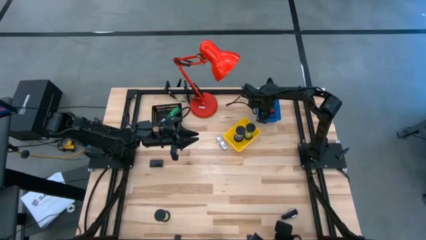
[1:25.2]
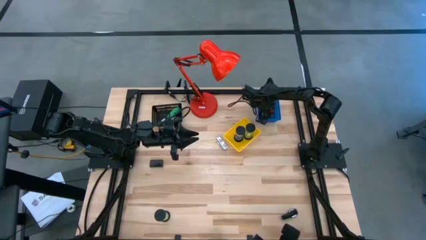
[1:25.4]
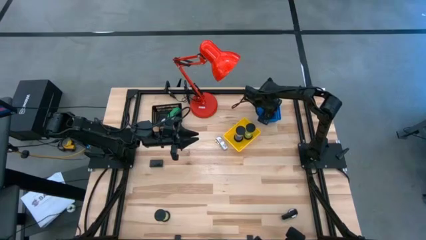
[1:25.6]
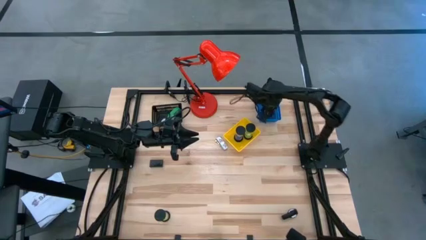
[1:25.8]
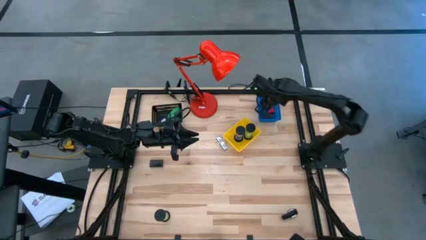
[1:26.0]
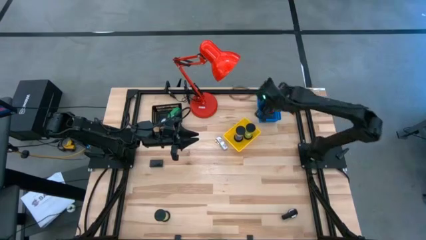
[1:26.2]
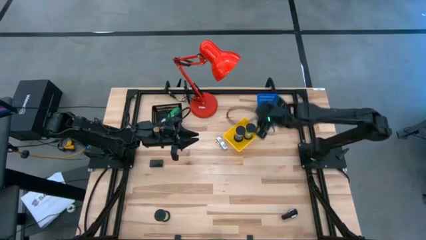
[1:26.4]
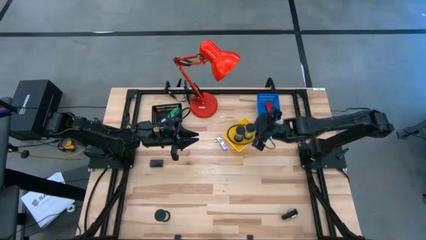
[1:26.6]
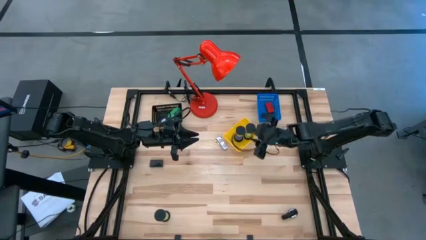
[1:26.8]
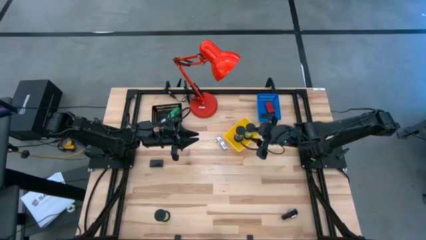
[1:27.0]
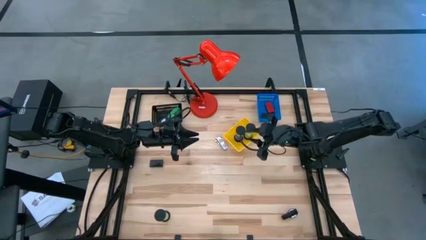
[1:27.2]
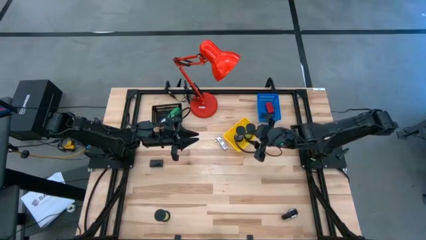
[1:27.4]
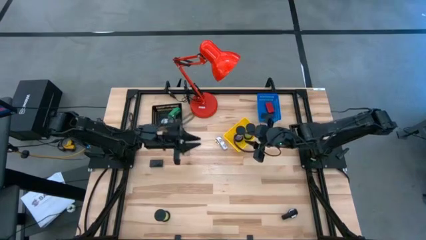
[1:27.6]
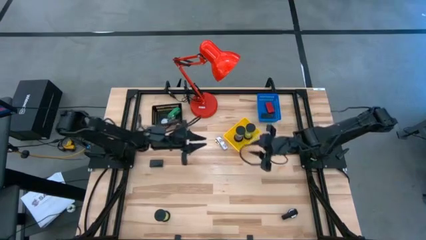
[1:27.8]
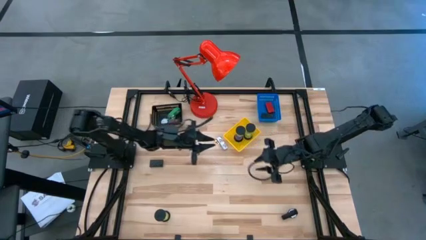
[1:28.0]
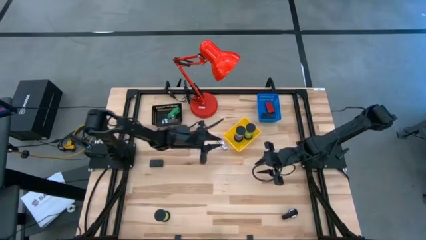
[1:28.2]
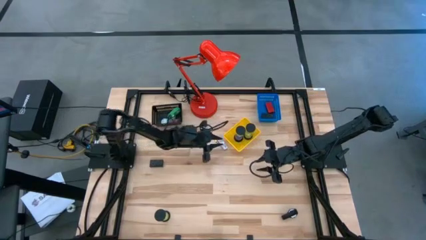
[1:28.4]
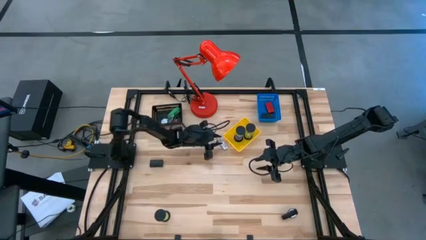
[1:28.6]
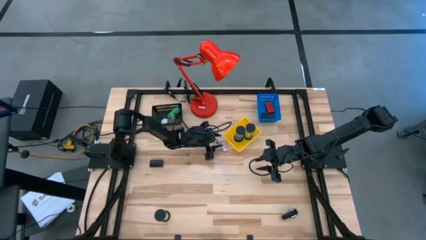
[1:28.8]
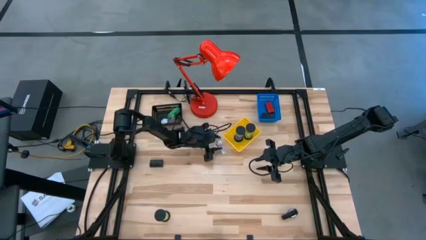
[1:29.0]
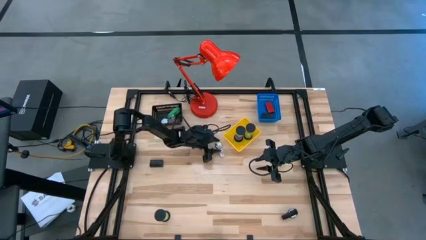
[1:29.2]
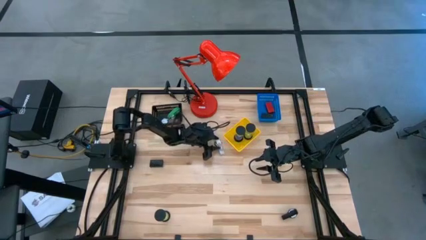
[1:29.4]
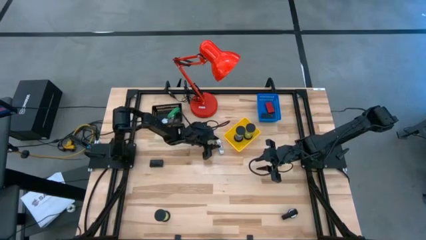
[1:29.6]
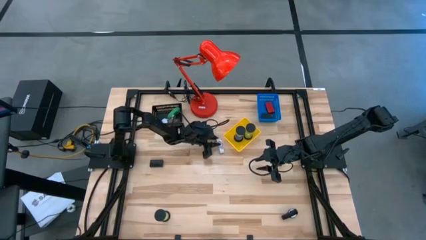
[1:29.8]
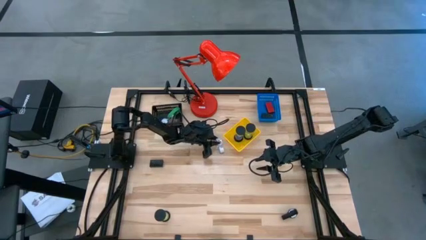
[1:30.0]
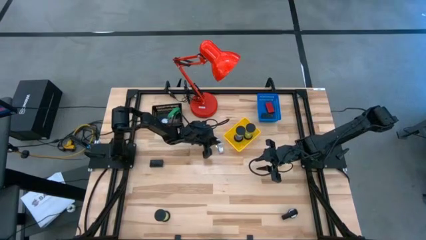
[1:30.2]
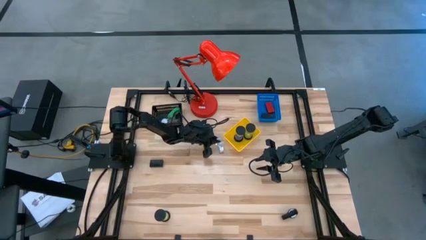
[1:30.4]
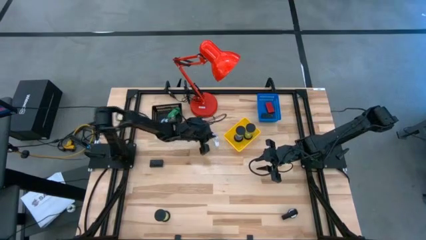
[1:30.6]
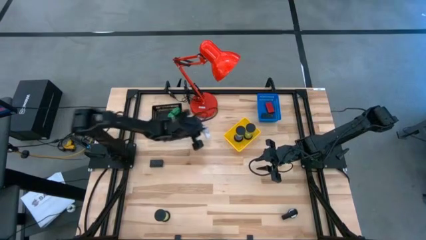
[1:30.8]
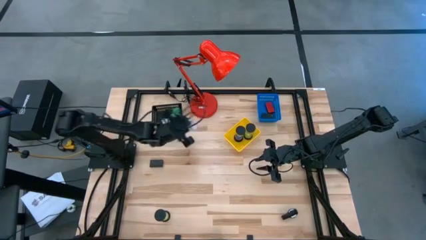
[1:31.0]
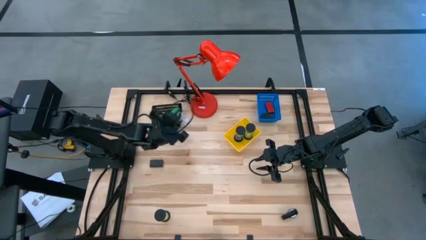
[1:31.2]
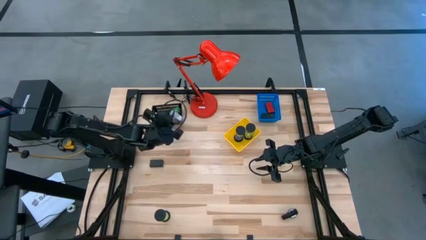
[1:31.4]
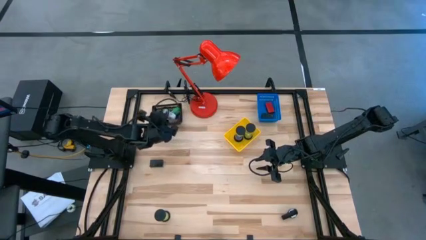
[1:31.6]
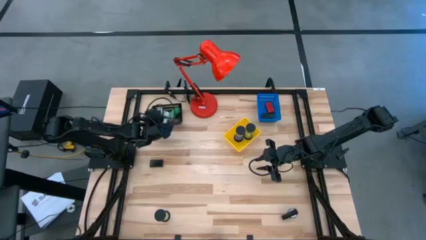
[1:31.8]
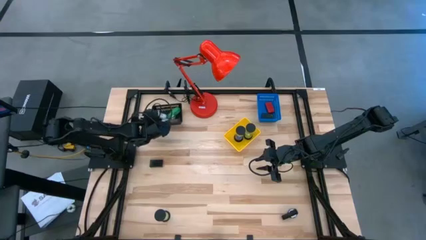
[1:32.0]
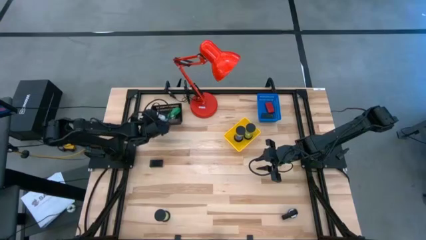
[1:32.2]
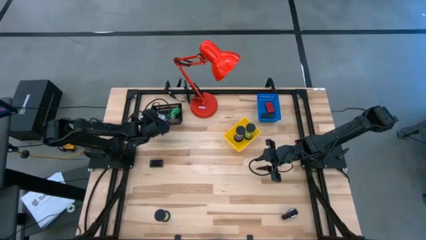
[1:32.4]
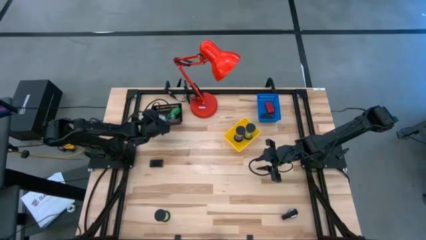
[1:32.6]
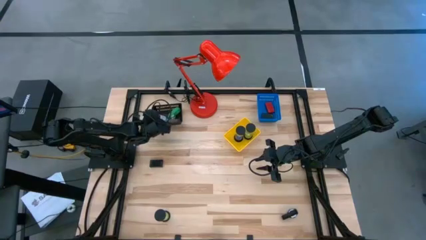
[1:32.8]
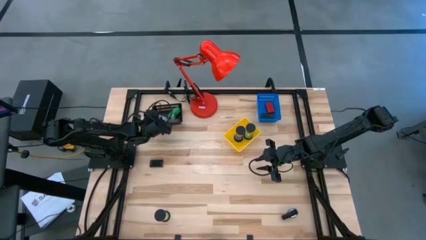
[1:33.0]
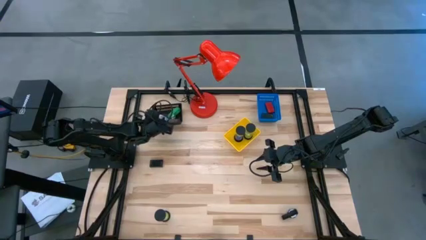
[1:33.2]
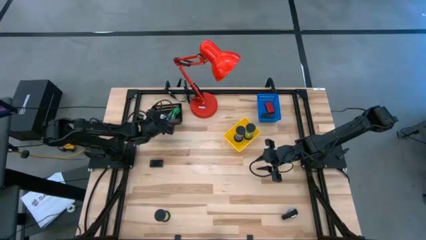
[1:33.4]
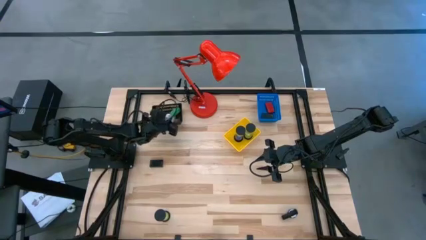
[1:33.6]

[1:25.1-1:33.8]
Task: Pick & Place Office items
Put the white wrist watch into the black bin
